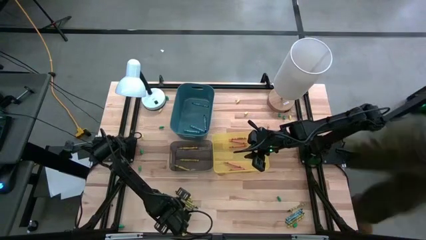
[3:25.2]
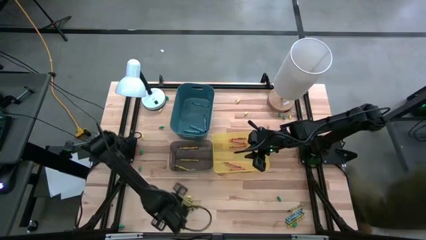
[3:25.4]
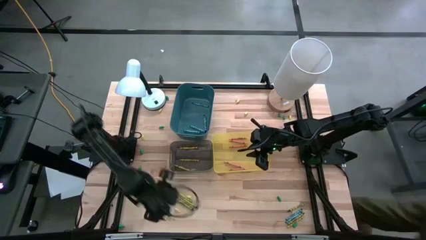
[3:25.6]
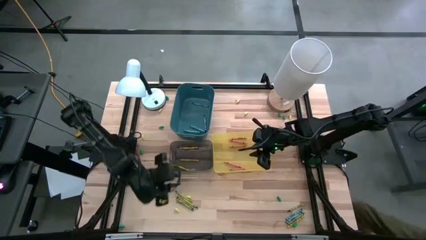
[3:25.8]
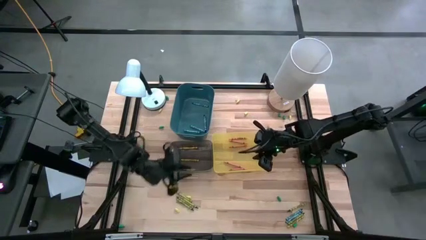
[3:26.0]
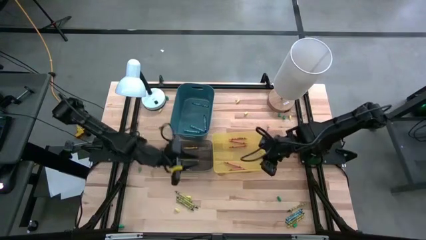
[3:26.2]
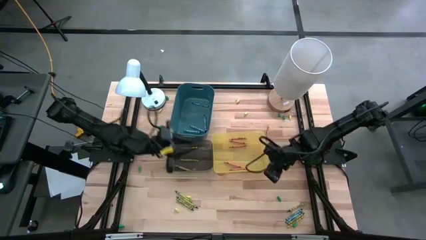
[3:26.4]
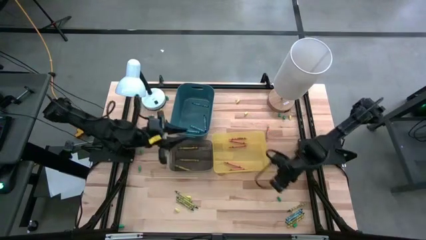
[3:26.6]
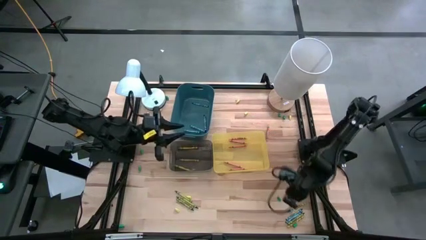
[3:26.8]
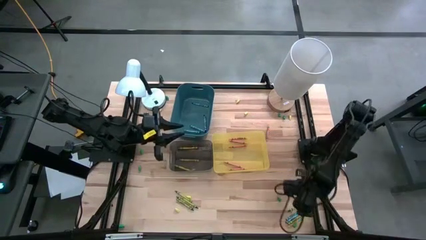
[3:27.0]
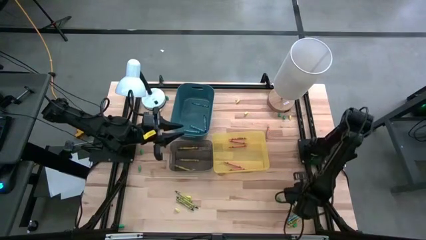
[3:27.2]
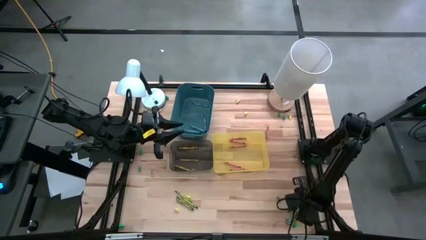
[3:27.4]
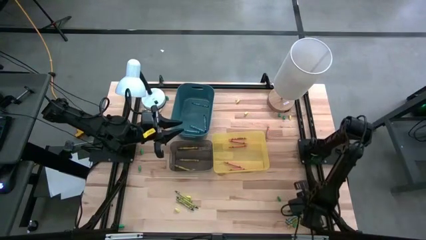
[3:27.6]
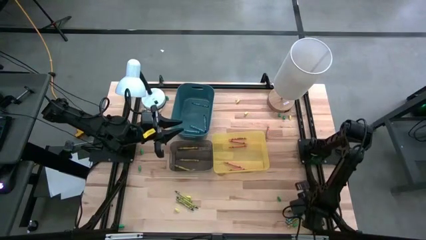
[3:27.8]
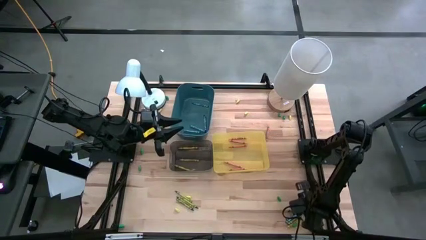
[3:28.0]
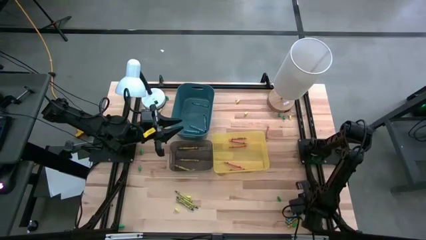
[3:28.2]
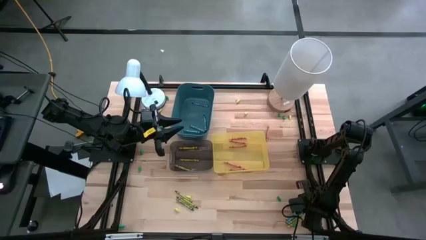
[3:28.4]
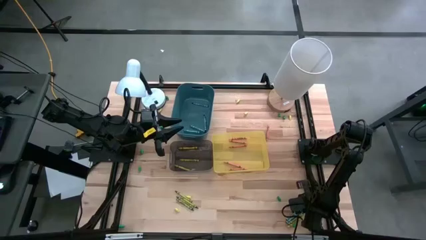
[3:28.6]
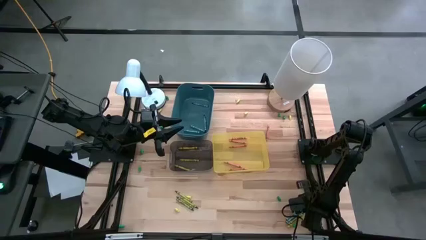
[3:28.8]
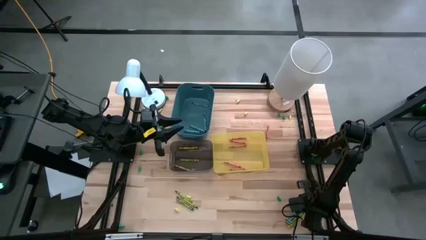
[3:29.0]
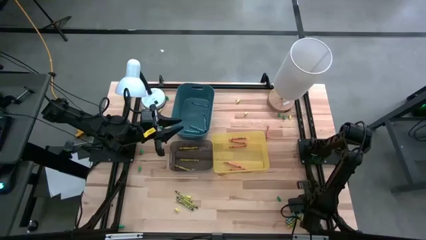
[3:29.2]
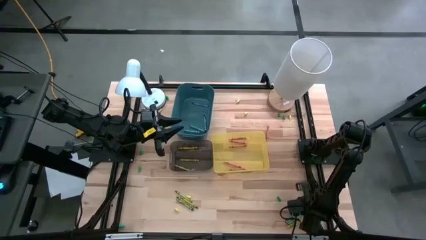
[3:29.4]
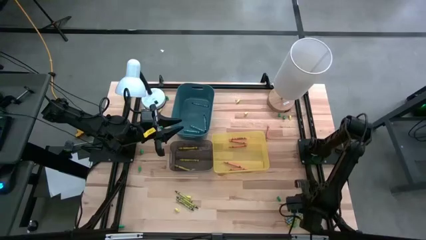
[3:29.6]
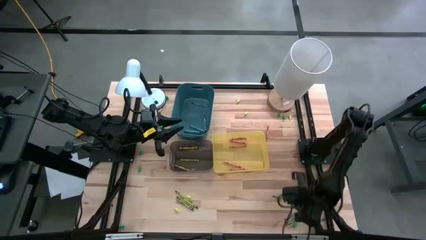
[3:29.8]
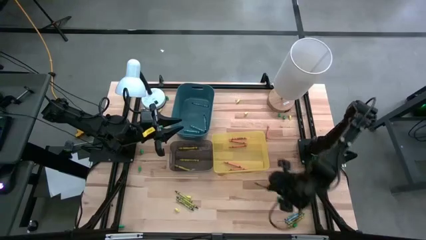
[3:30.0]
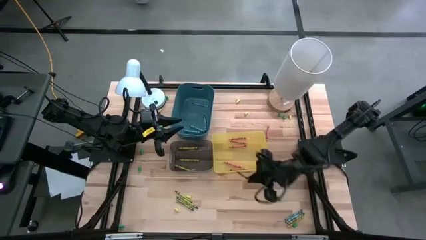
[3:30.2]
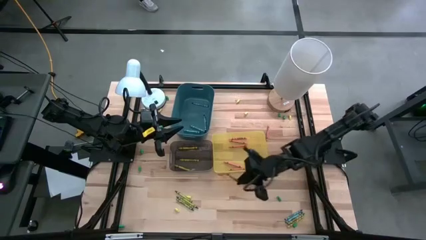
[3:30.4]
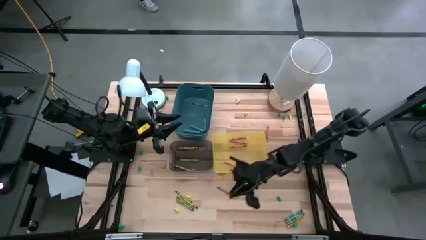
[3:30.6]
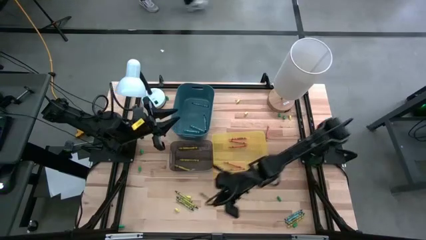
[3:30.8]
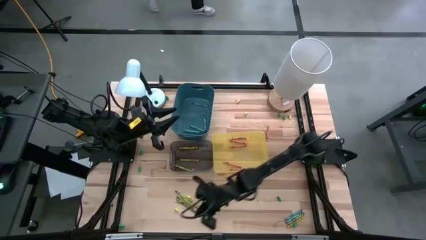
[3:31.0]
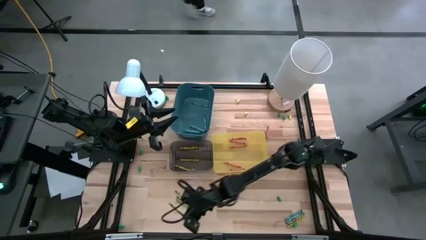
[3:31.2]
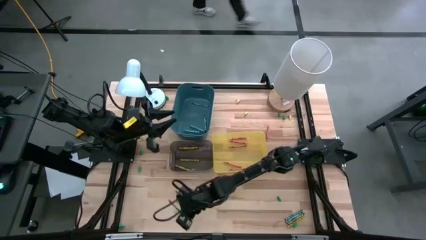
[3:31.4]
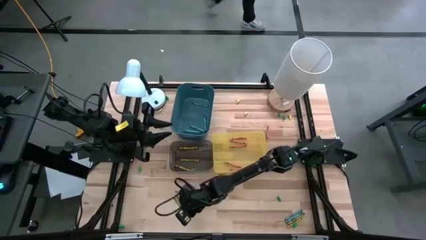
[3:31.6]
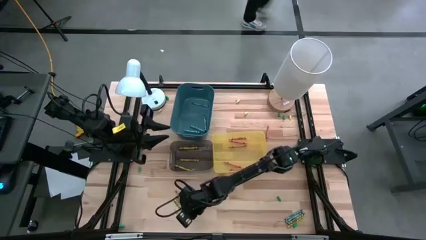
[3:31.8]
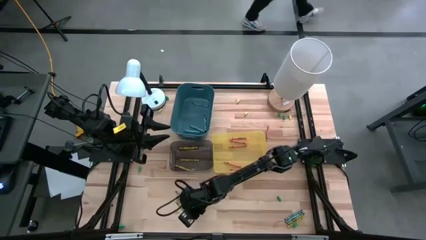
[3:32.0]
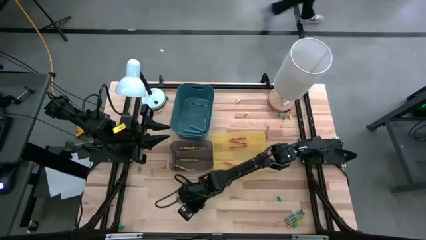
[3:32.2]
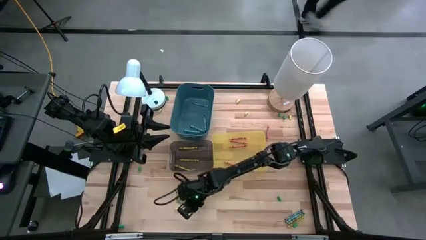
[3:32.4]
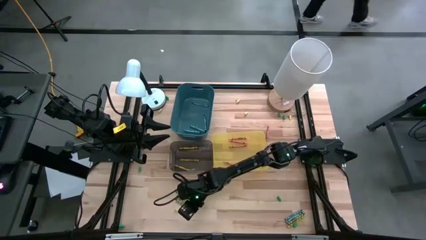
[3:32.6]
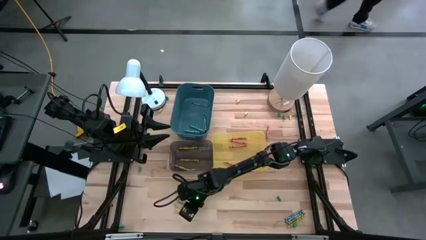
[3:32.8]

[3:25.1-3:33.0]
Task: Sort crayons
Move the green crayon to the bottom left of the table

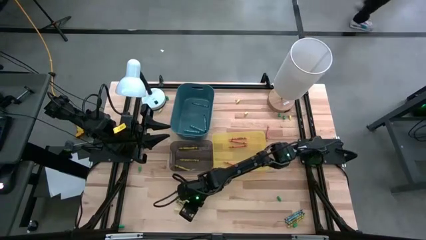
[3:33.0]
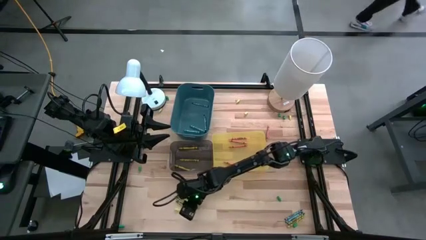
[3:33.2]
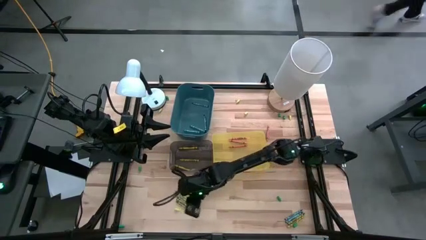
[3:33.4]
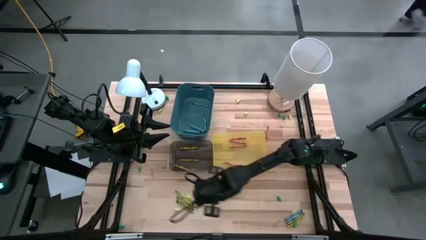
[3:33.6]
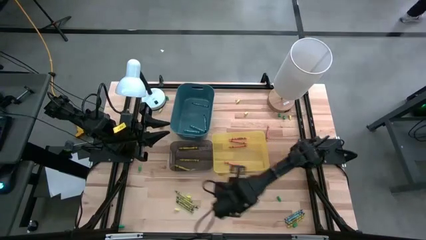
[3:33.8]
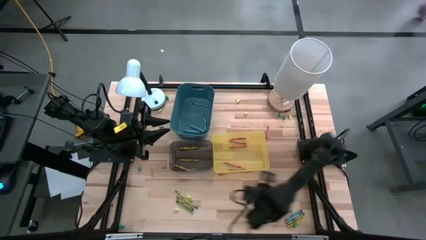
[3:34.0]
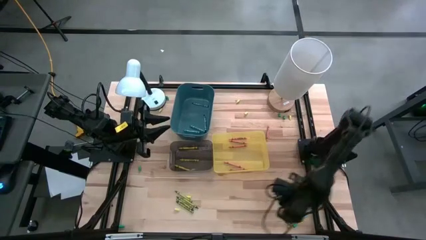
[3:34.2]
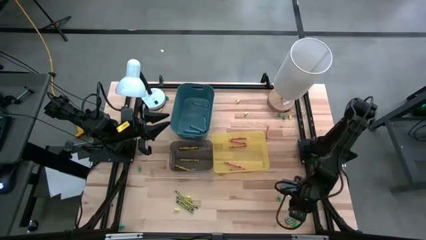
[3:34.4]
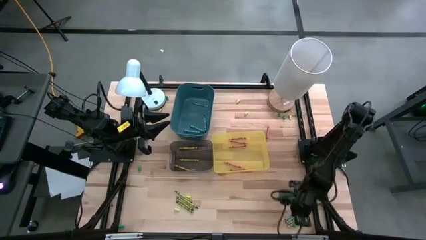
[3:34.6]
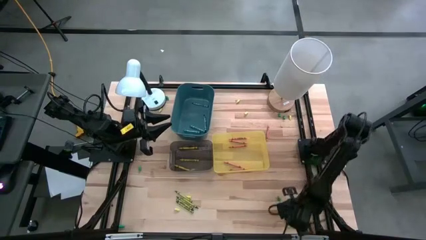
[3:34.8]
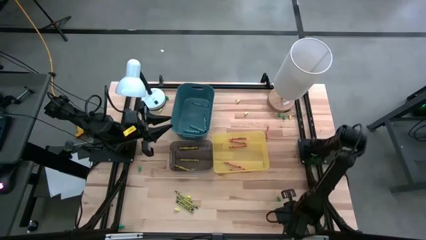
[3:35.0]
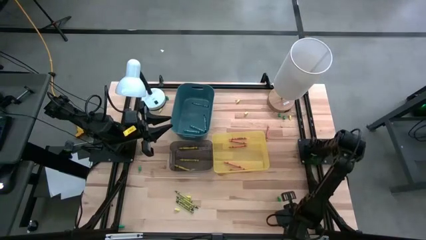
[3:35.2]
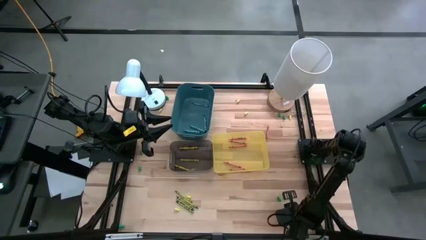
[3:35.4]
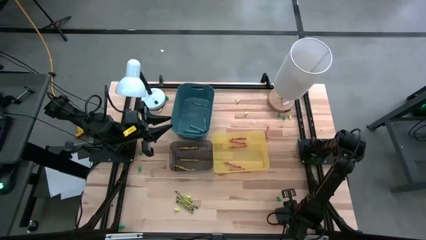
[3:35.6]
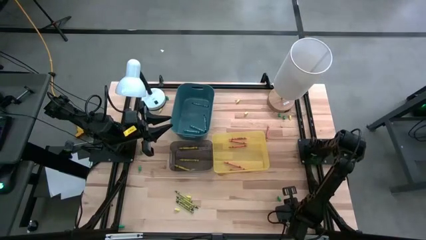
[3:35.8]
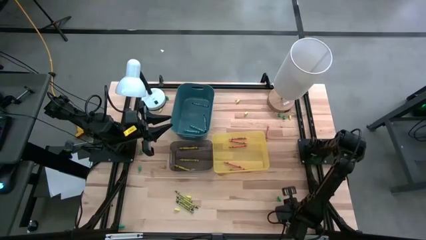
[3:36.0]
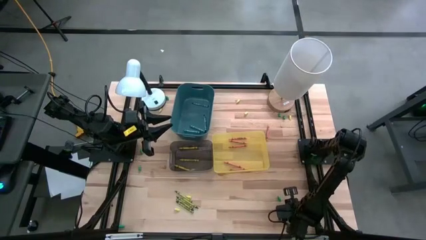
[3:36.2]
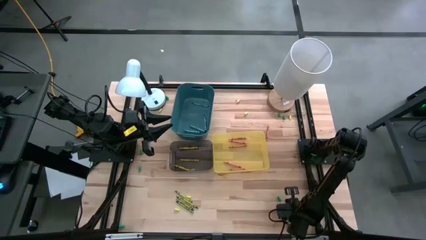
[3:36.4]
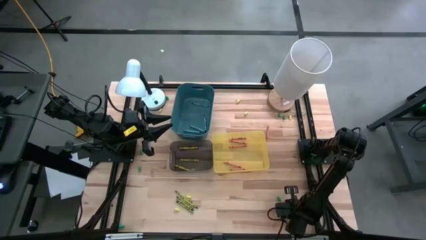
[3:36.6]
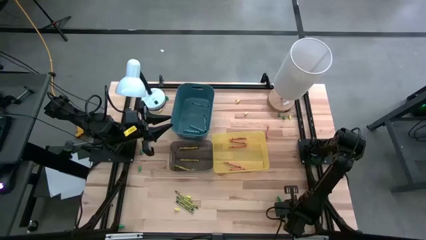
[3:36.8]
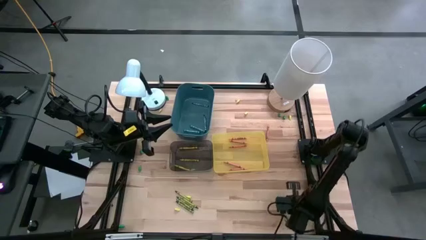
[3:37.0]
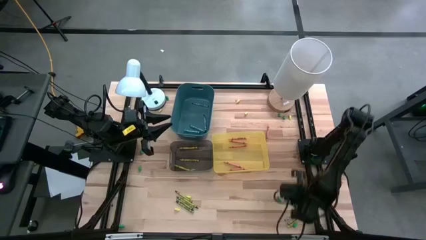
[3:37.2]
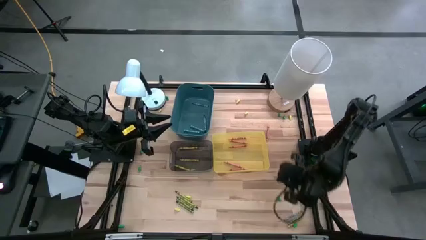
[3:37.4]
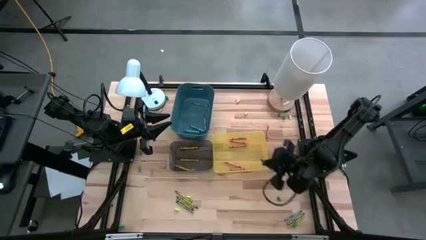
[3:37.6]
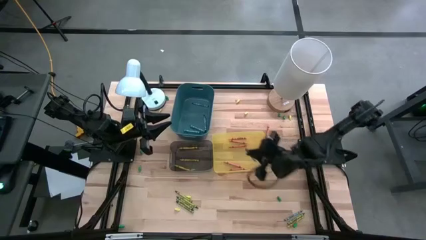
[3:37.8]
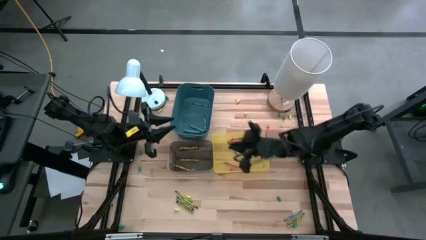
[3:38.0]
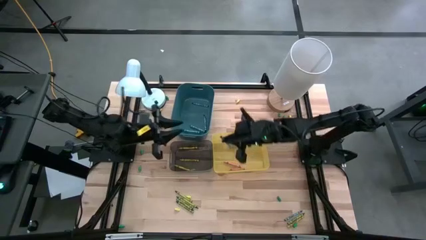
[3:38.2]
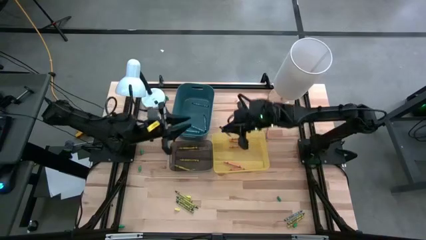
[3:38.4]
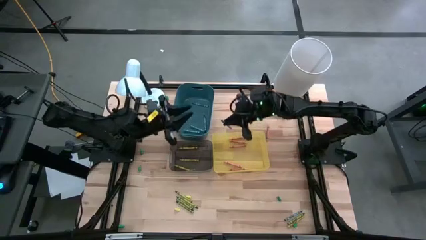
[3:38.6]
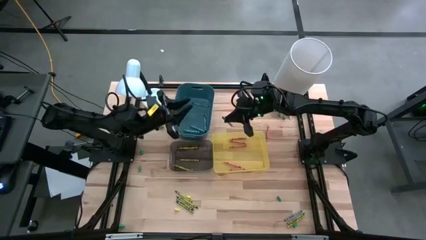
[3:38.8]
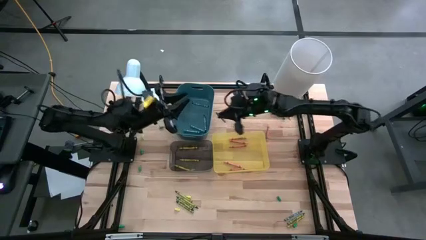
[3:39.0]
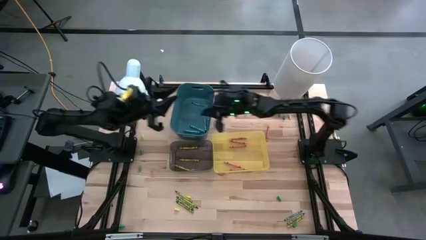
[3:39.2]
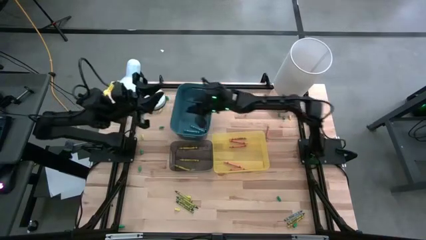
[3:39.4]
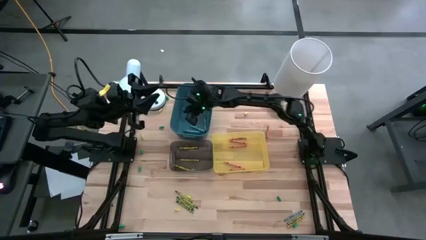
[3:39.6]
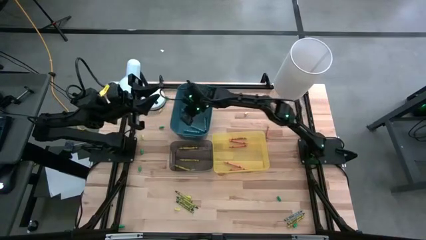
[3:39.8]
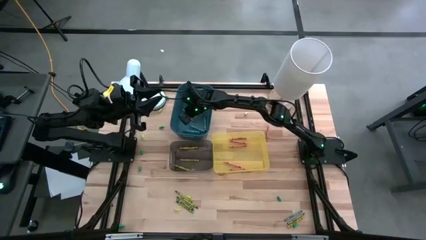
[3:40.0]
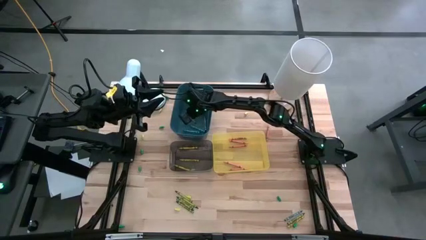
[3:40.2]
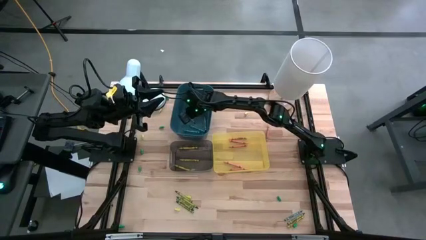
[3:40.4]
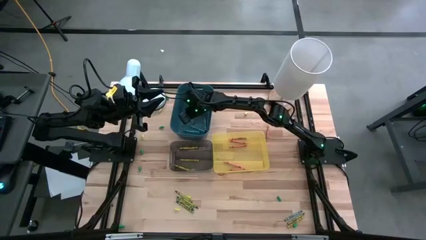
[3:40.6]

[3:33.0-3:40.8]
Put the blue crayon into the blue bin

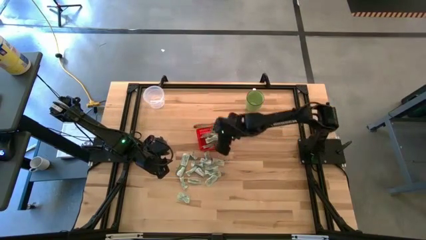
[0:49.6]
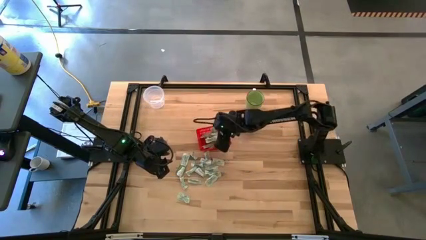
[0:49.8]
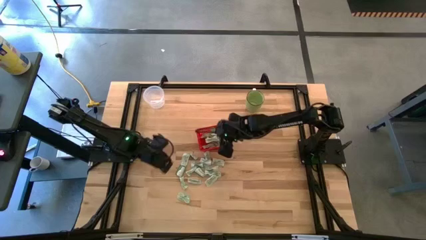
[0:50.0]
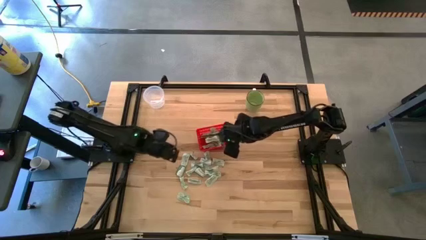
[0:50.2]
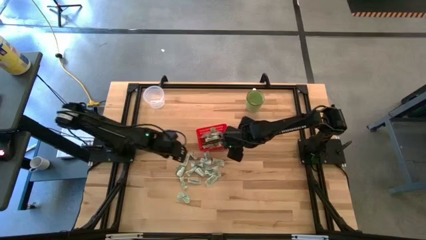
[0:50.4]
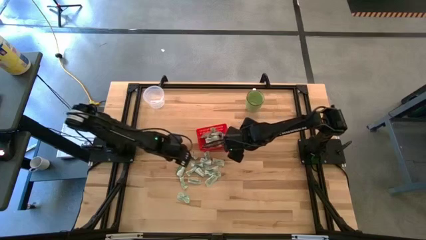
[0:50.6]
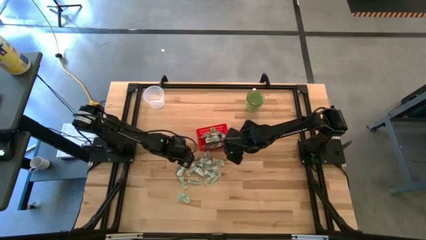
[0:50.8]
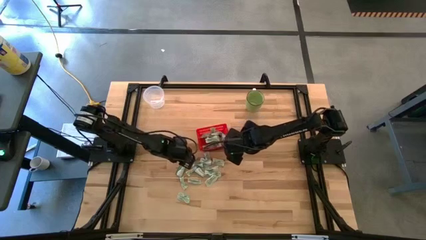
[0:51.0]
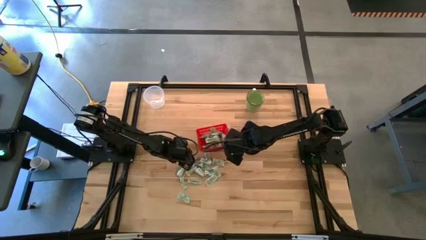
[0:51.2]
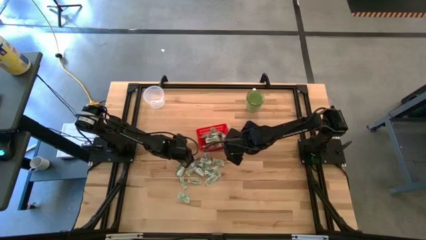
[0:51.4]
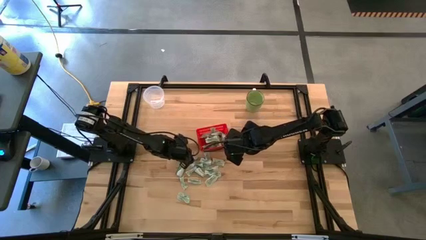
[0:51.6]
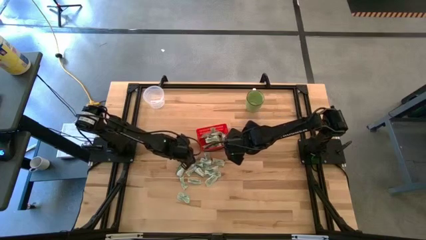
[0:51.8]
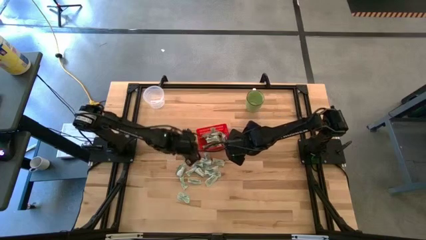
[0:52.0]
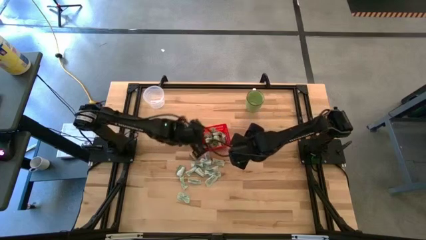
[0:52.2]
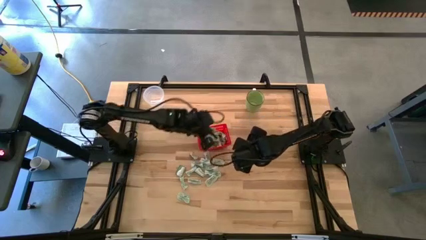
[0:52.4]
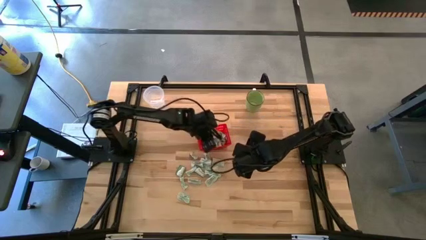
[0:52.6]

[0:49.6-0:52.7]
Task: Pick and place Stevia / Truvia into bins
Put the stevia packet into the red basket
